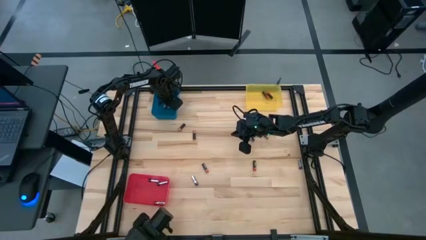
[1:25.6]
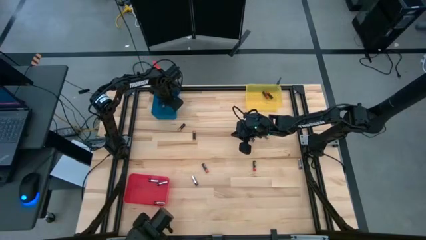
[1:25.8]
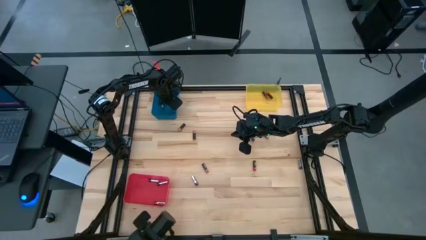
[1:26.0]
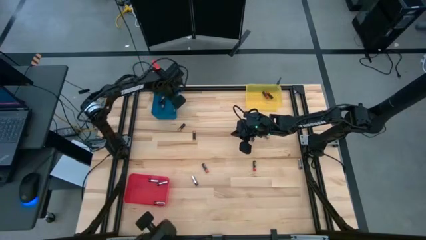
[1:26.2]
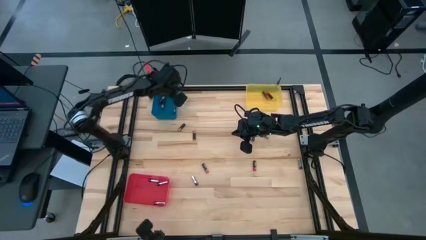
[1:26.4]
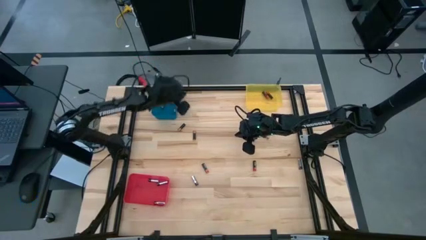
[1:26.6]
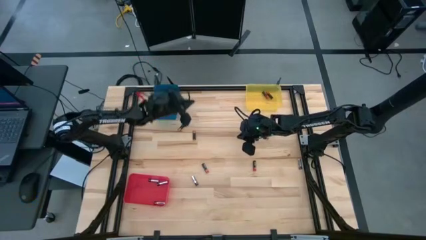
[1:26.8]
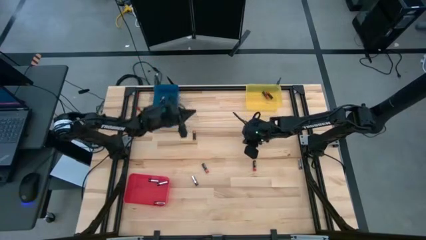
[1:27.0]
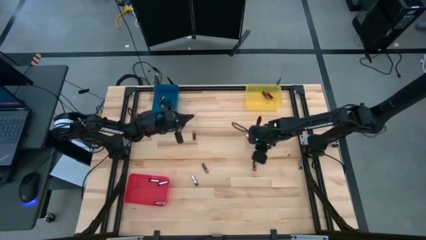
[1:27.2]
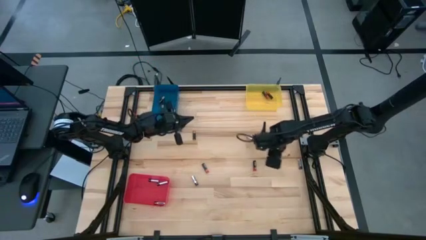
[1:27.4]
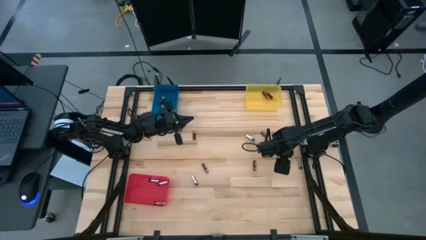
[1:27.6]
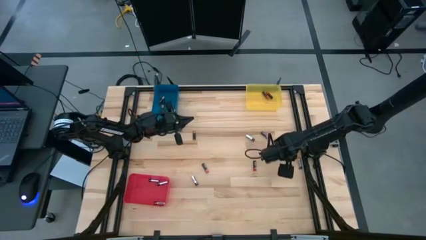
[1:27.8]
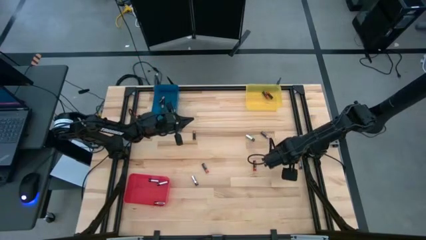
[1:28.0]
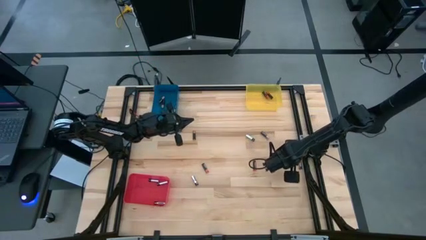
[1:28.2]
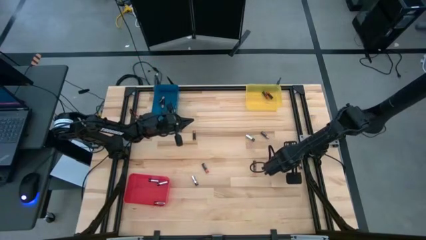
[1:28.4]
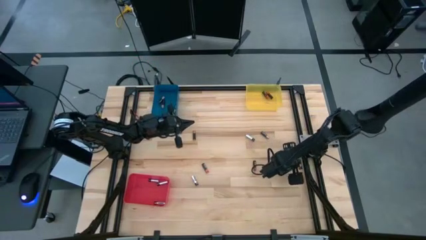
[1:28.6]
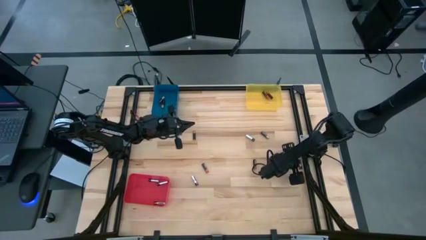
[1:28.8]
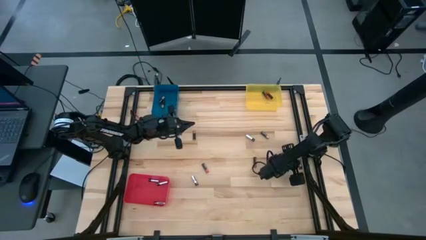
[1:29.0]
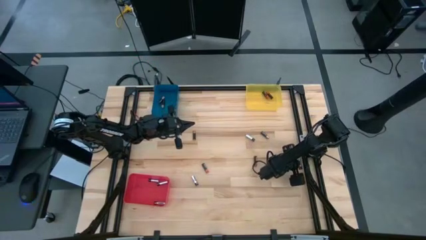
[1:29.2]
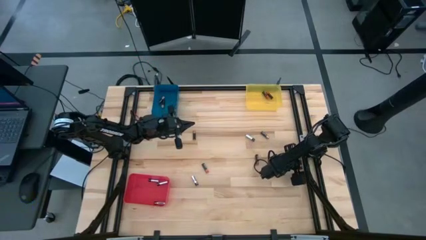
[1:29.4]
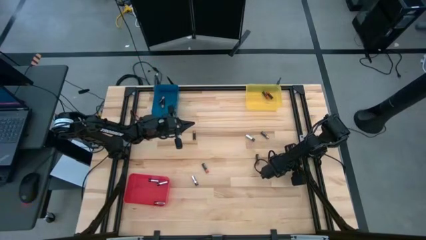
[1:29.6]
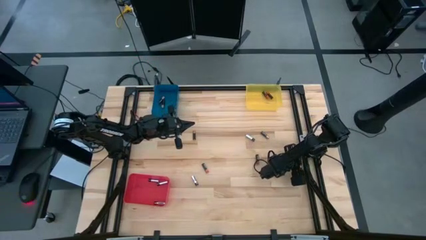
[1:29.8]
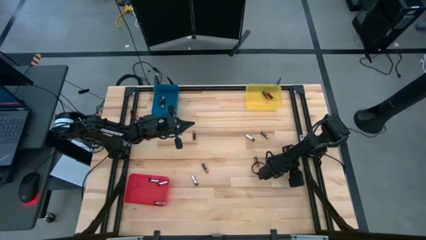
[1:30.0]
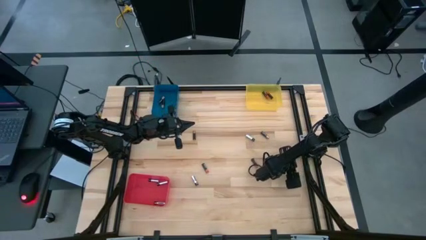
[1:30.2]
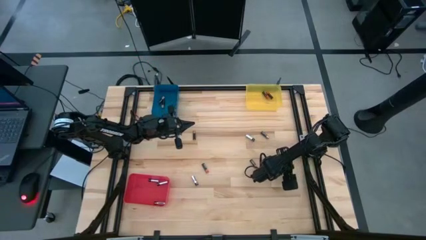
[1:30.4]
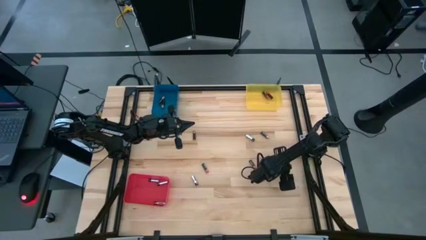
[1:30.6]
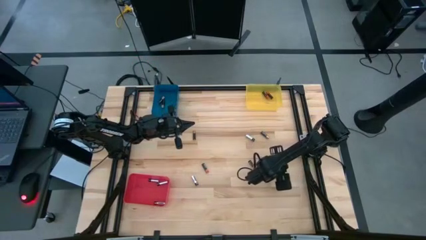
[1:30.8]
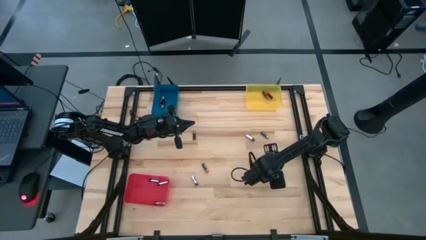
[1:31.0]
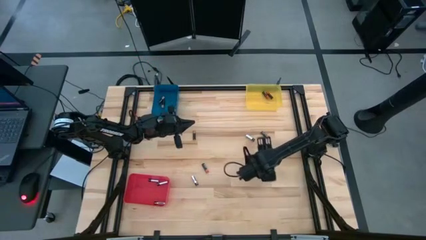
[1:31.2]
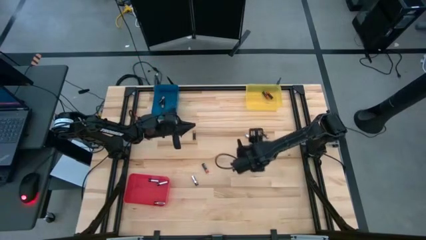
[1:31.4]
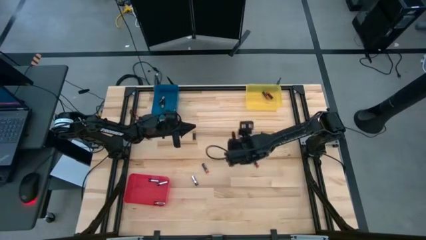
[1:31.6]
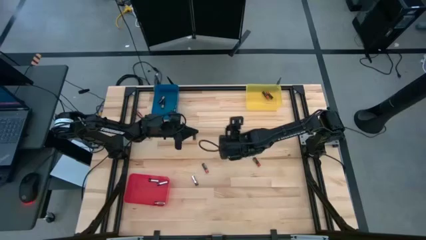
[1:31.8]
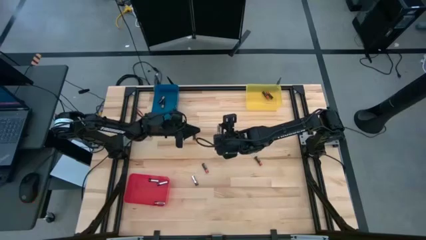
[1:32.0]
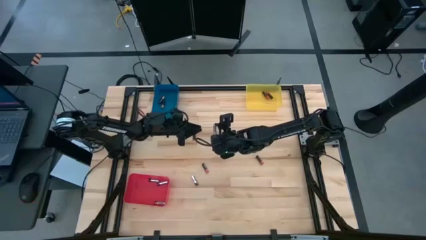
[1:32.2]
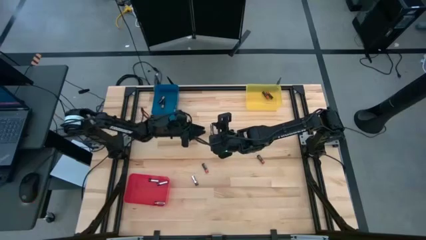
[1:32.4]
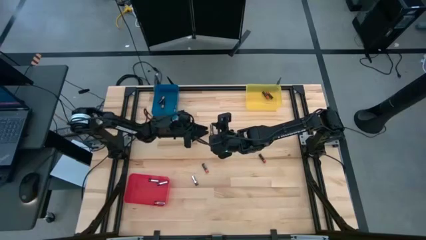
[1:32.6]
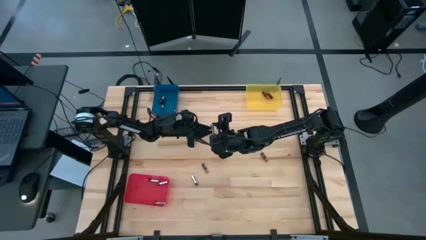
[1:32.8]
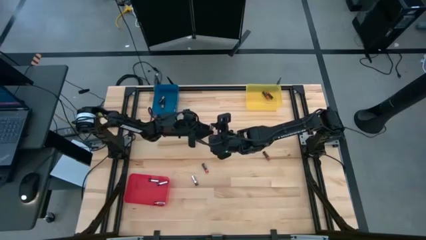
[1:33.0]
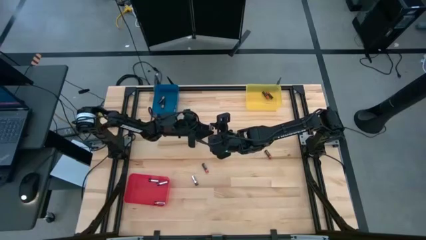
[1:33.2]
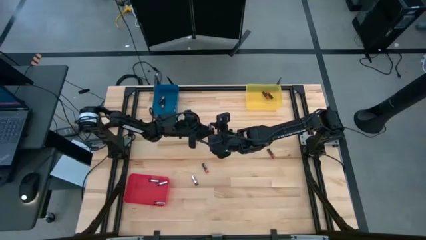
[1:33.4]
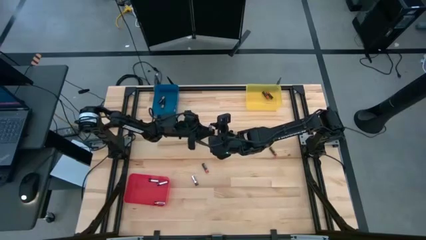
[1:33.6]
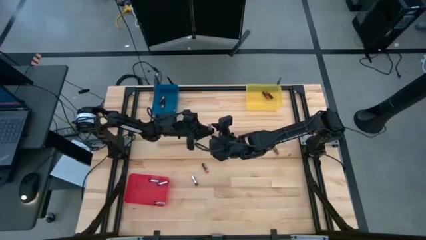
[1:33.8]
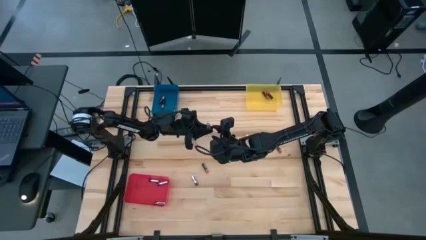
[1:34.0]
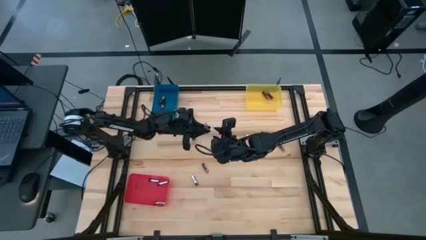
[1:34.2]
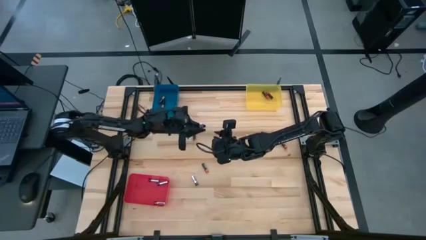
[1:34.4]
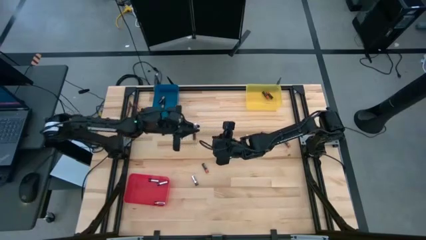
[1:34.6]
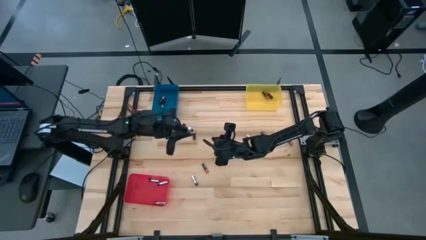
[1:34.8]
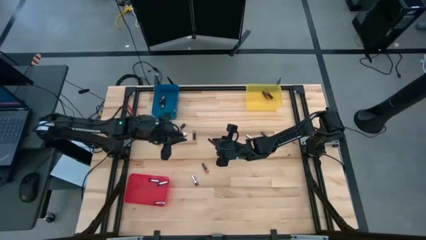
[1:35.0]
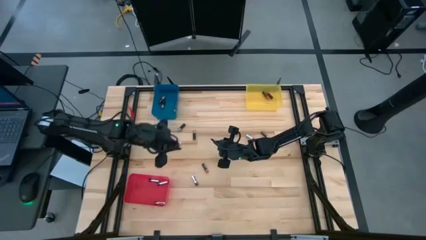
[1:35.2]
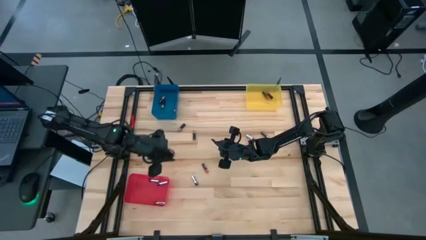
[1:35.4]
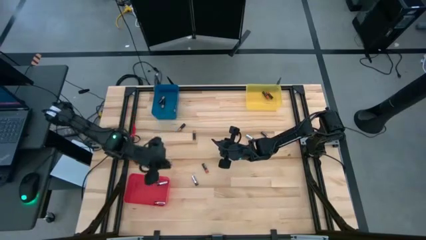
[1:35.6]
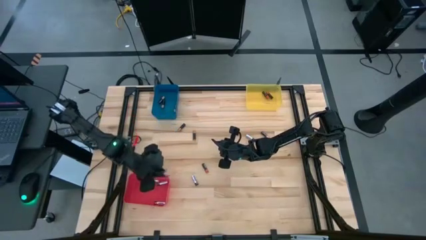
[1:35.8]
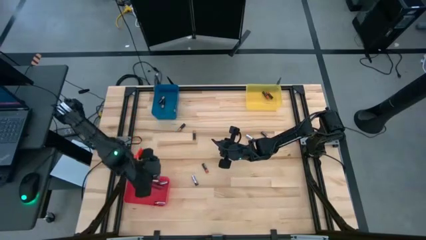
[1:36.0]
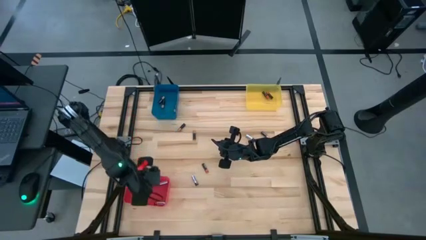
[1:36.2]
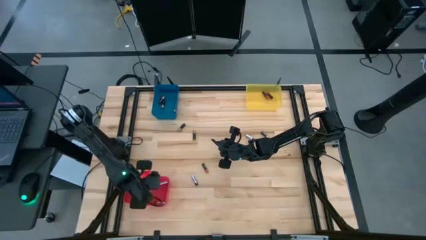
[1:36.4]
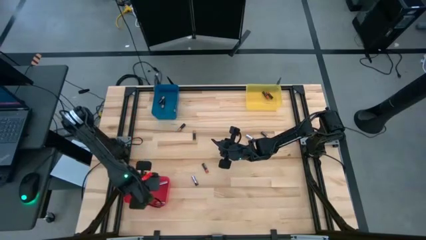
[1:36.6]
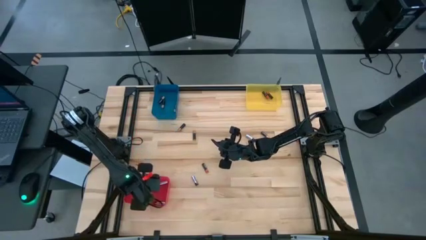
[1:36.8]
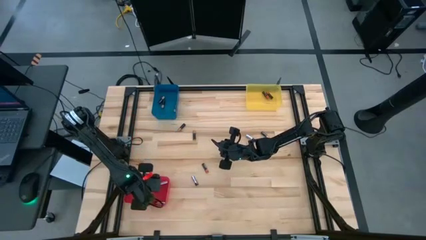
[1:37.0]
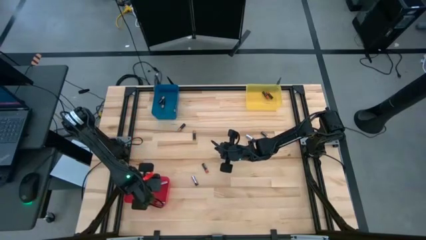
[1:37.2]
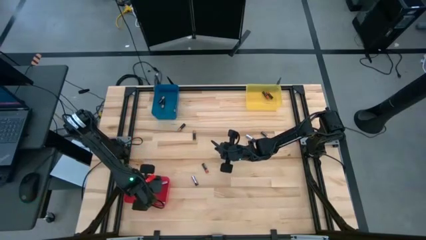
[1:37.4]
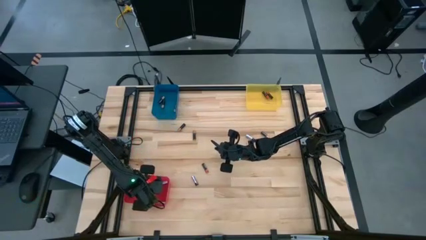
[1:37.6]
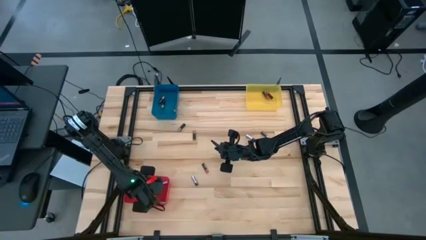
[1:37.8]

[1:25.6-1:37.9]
Task: Sort batteries
Put the silver battery into the red bin

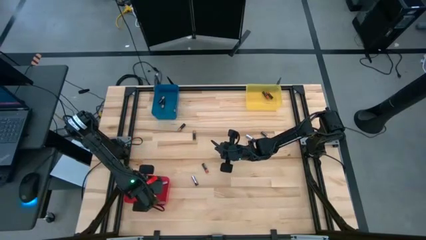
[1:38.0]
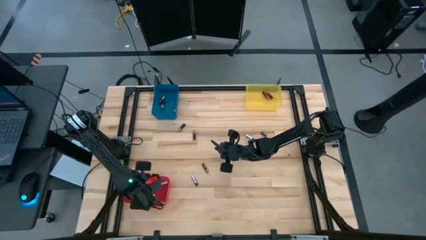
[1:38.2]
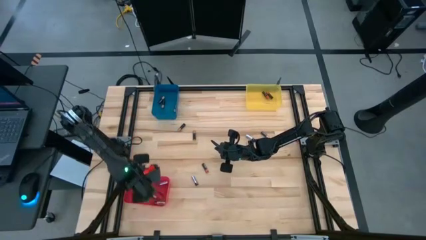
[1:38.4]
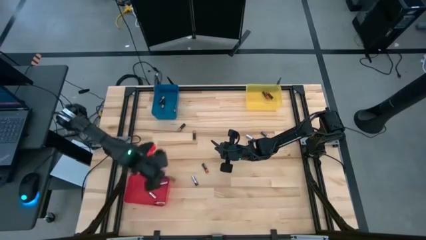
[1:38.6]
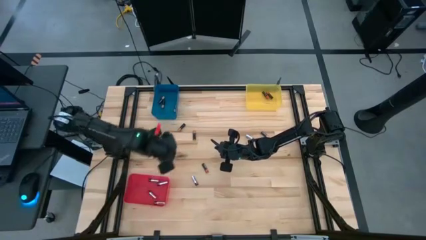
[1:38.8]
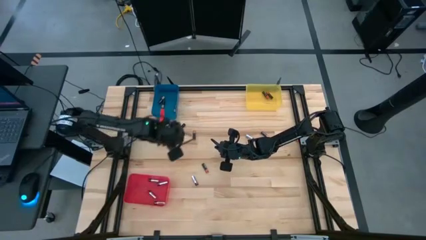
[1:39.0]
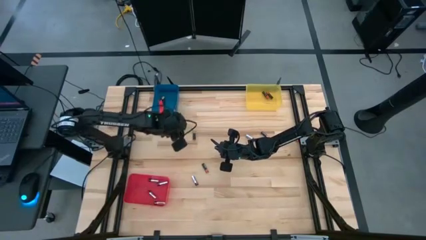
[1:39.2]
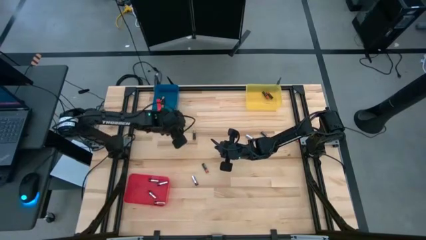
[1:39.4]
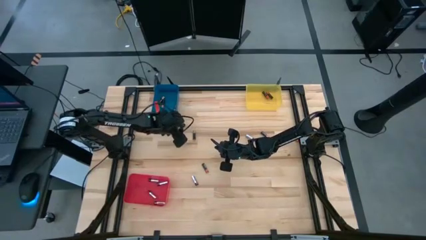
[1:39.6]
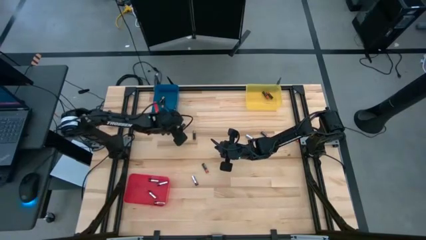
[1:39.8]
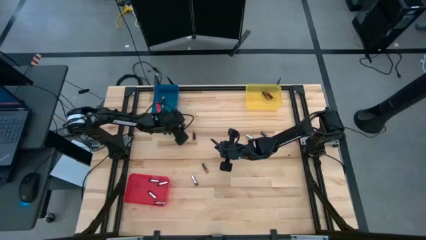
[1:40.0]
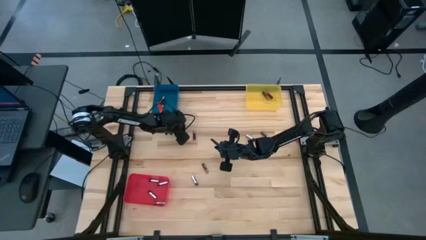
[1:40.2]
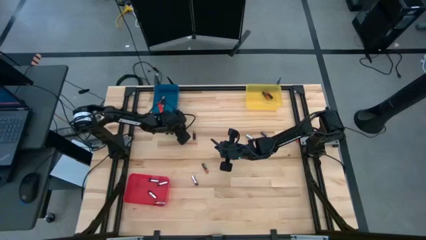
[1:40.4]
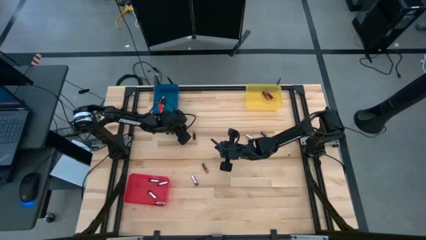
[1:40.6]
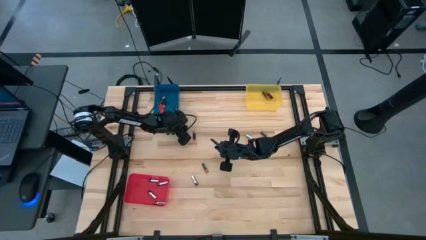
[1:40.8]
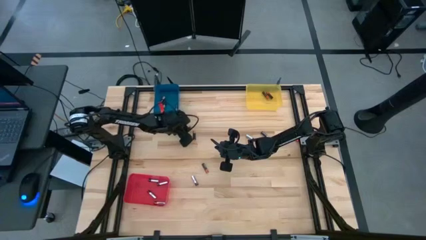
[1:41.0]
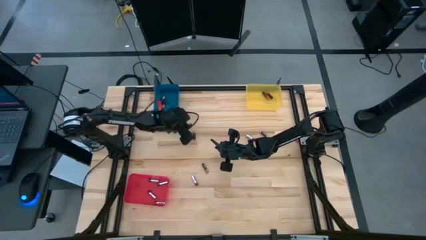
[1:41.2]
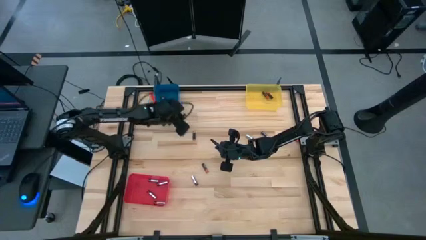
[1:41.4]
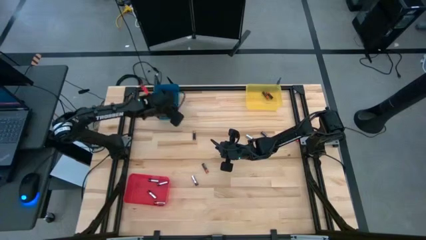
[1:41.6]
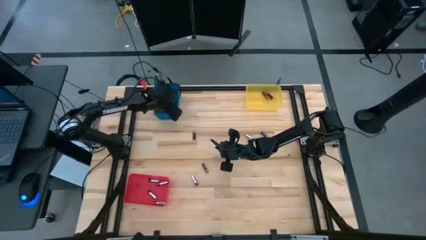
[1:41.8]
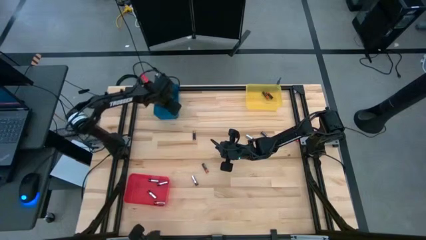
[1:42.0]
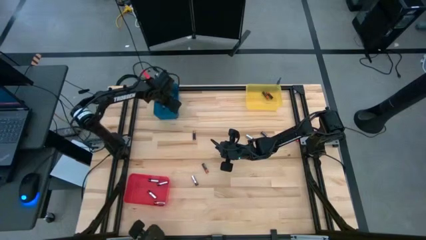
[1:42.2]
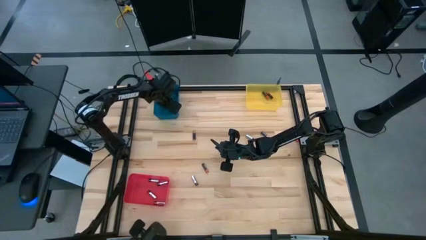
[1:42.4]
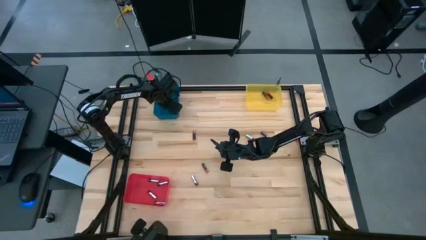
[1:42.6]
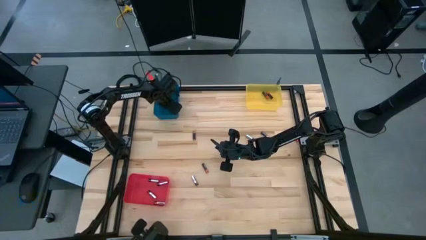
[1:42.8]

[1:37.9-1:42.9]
Put the black battery into the blue bin
